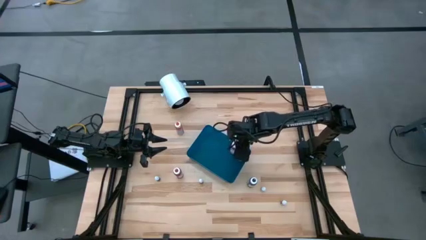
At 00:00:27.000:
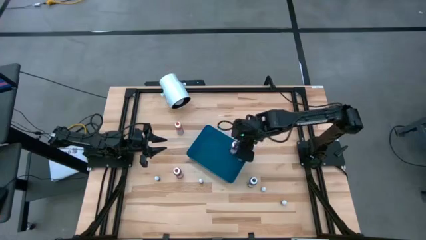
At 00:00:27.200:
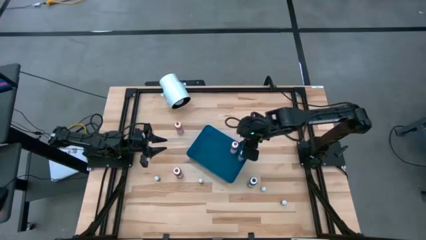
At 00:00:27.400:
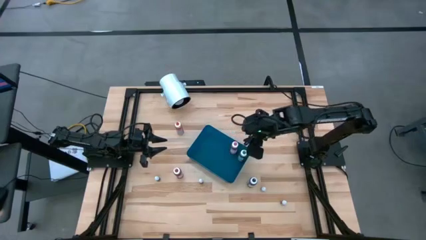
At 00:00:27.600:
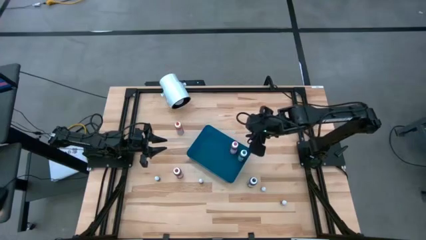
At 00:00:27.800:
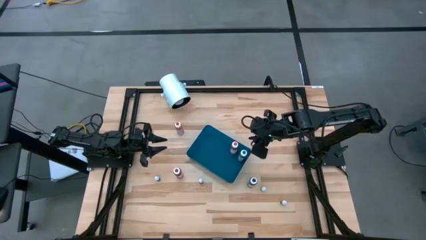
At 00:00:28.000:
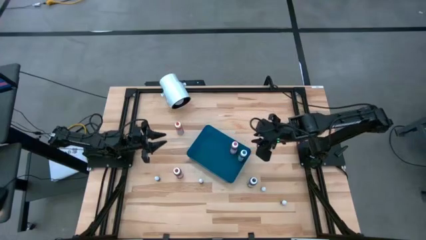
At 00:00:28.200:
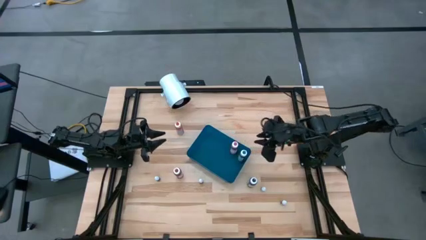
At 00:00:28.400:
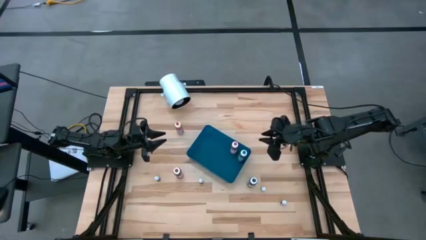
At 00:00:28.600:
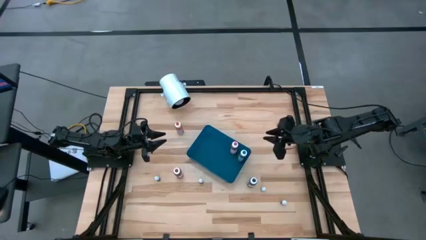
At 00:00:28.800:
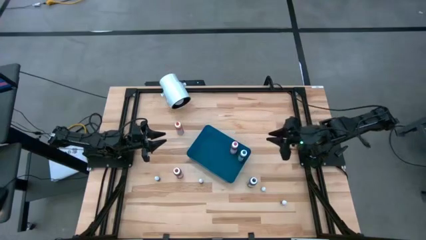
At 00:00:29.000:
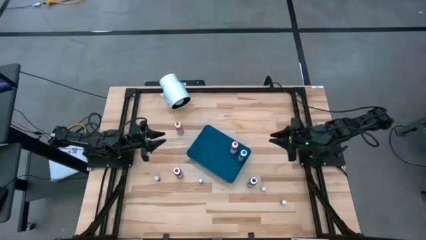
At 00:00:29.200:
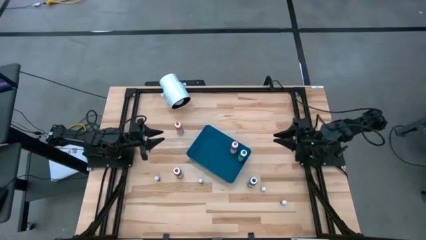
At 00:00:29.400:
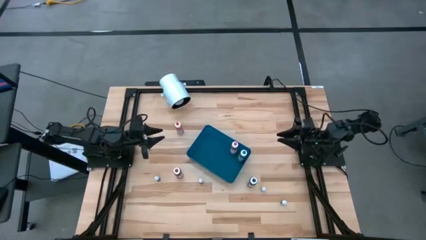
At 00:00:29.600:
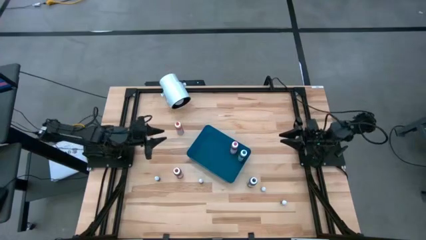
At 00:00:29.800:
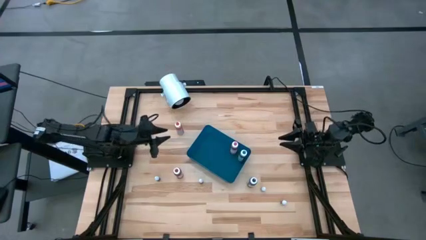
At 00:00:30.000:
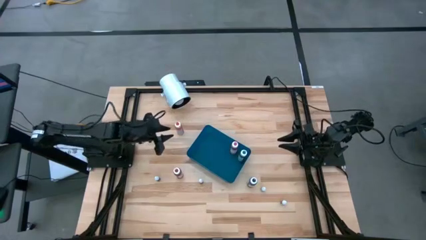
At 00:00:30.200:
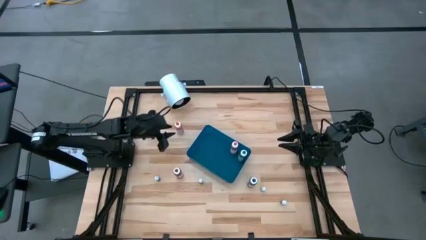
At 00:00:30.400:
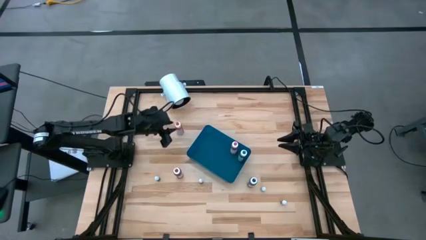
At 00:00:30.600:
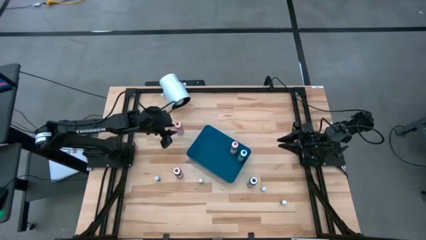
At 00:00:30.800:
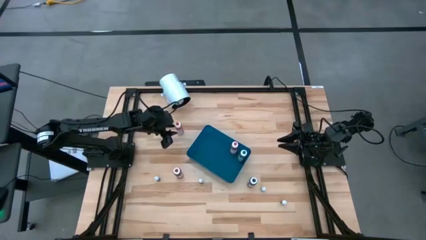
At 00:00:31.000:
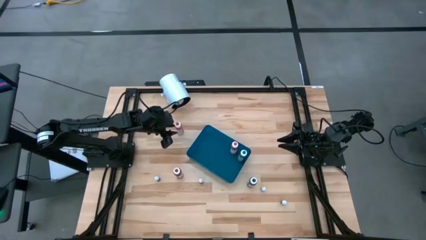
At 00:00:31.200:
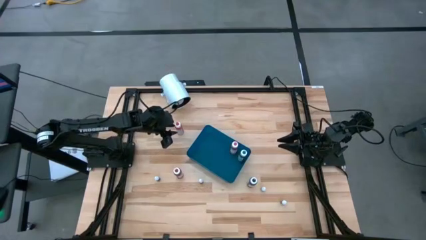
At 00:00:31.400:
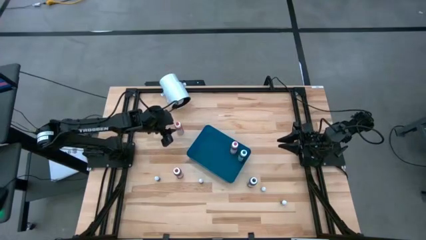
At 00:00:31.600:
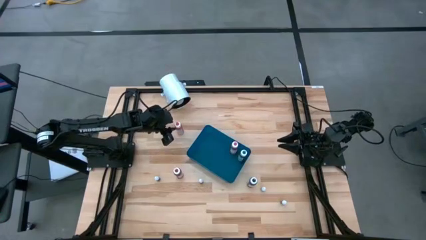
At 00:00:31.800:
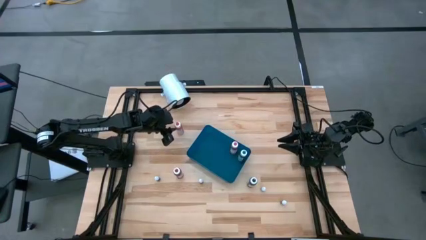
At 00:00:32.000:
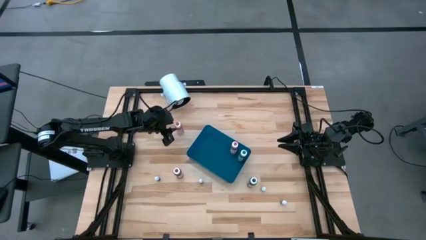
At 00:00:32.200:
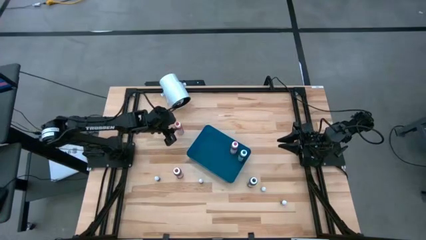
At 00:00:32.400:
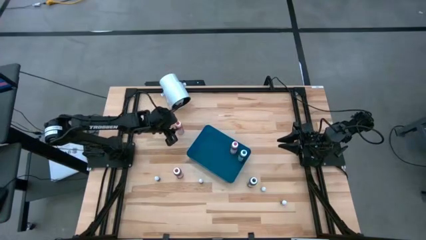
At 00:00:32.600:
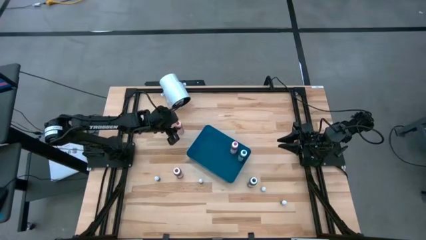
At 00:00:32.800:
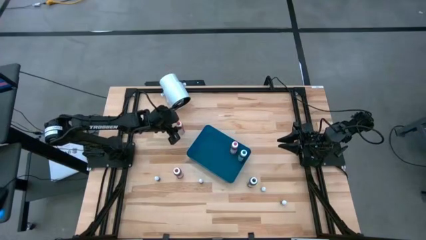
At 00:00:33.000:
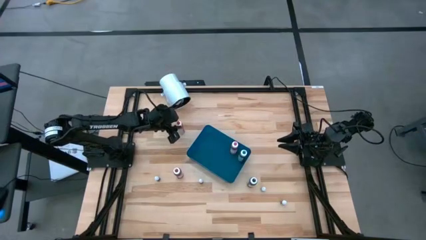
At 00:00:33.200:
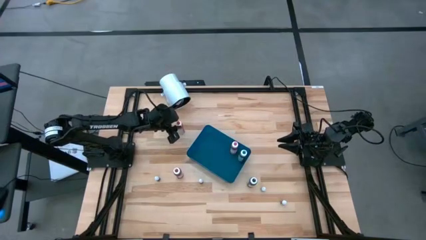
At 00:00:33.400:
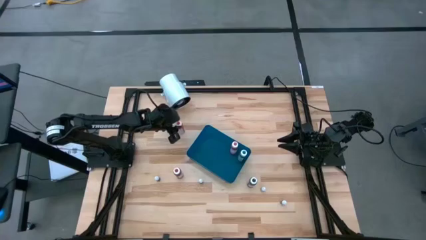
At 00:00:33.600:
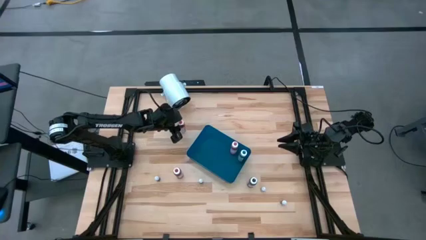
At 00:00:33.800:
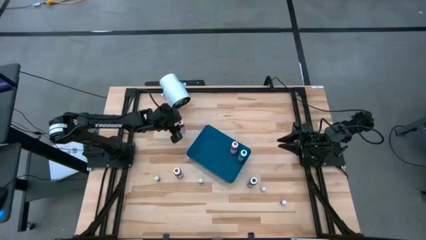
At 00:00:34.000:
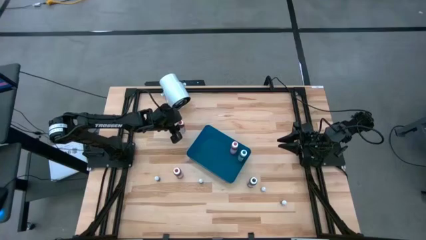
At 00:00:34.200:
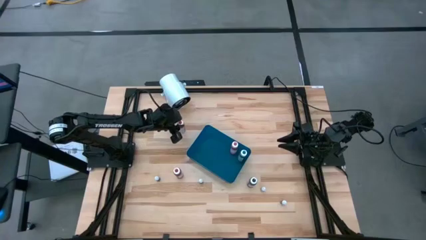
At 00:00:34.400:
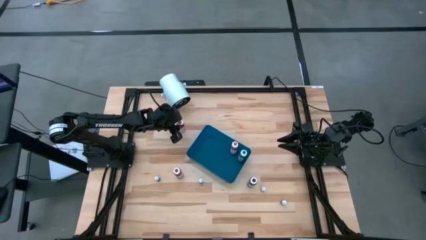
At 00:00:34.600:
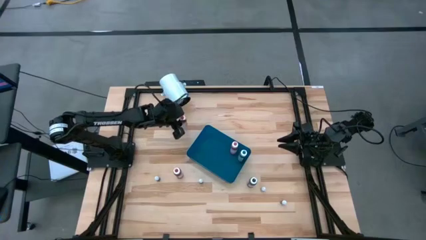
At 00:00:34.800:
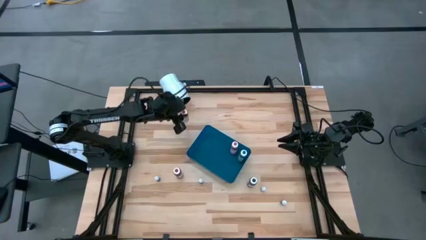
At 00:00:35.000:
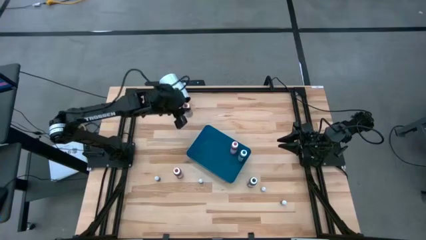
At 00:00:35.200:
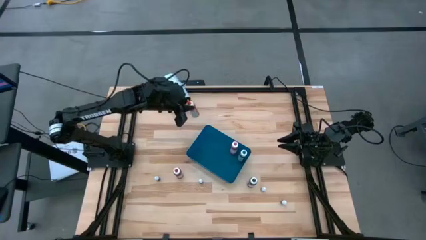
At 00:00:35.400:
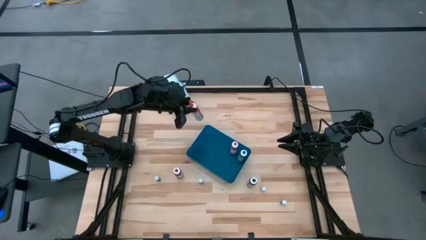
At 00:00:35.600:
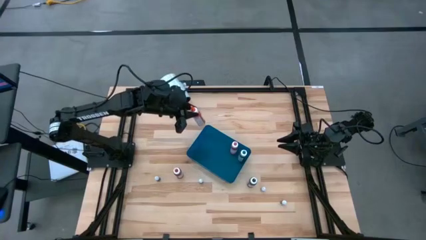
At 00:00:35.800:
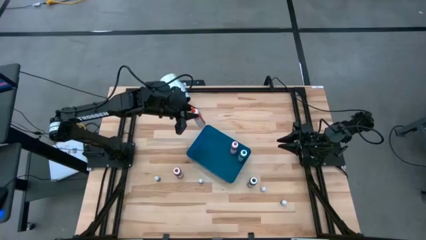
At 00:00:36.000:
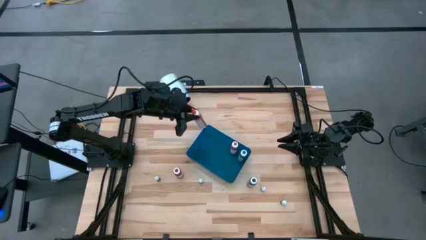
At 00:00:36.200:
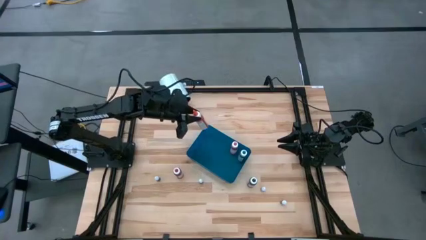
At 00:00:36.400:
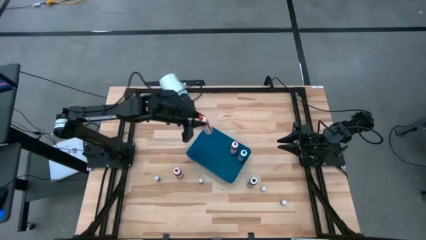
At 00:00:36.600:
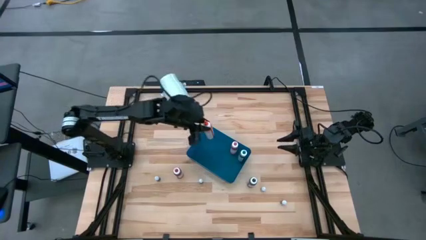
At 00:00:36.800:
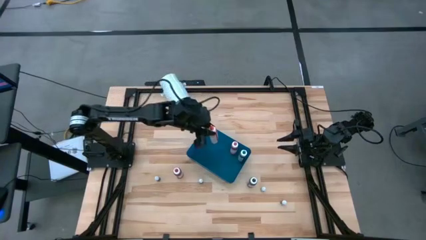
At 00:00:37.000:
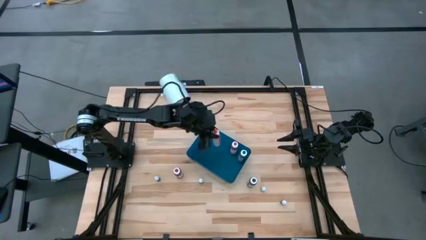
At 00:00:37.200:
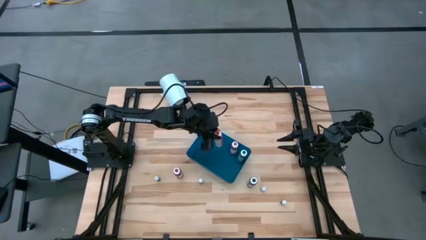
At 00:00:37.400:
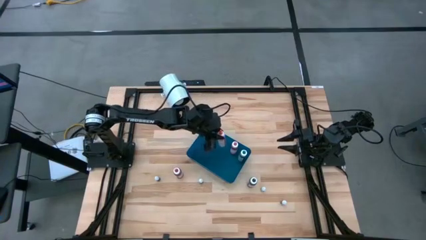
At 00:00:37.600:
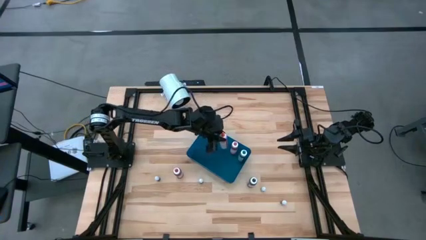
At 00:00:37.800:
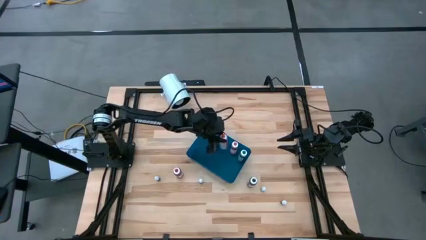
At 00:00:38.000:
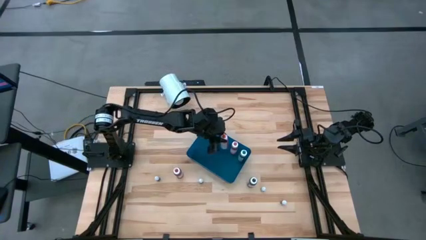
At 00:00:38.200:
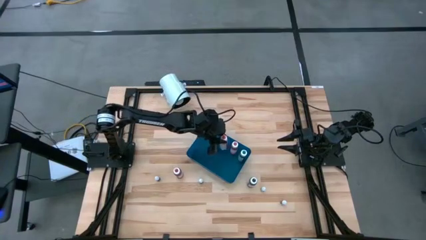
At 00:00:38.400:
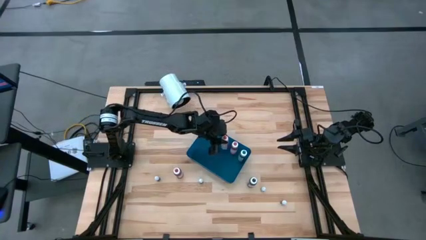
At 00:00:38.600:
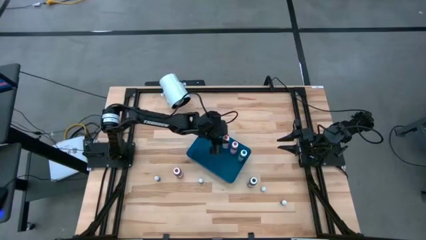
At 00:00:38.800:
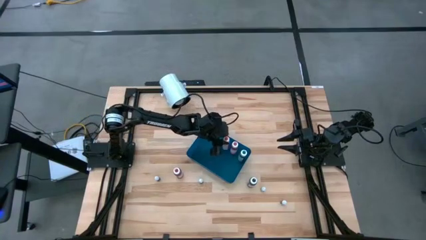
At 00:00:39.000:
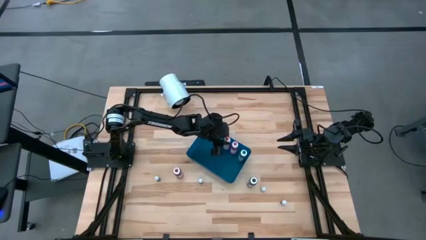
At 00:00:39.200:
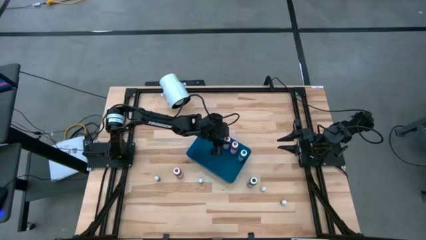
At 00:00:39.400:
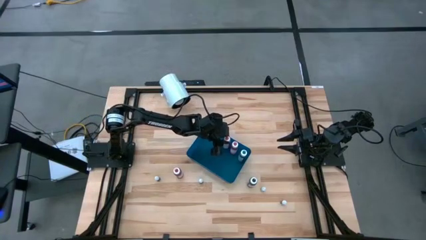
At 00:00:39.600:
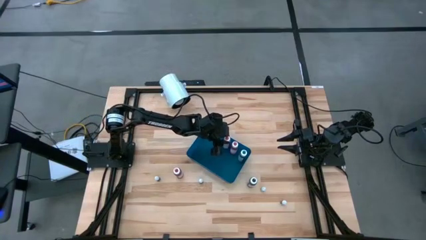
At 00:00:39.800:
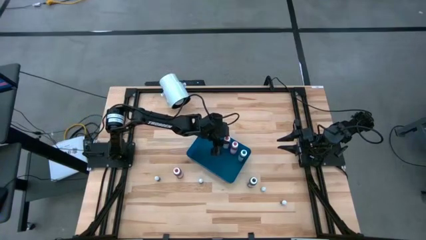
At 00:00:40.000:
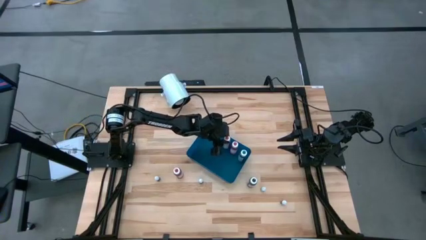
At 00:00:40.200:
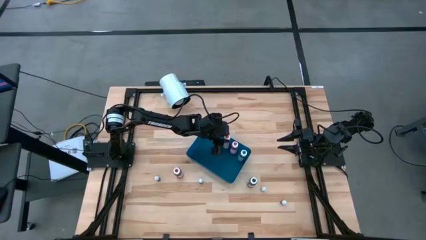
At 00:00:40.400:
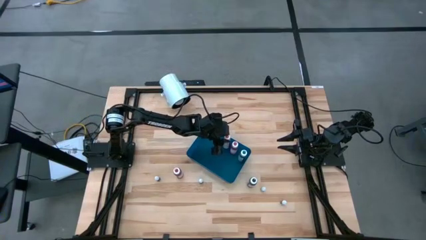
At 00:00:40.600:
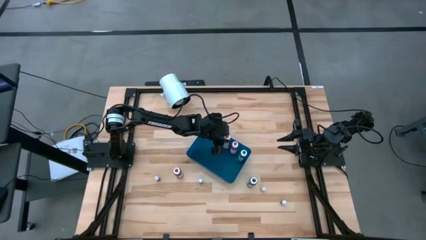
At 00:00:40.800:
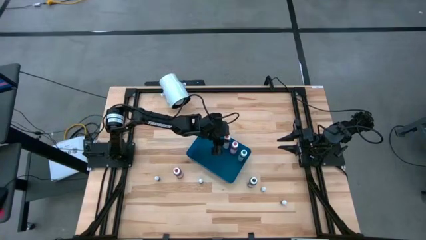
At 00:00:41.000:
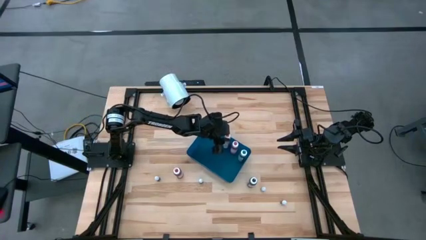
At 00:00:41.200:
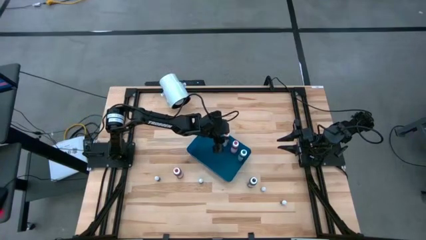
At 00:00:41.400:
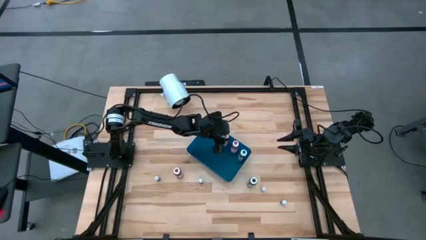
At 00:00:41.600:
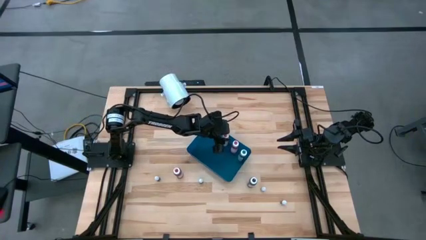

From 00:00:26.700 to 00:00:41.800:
Task: Pick & Place food coloring
Put the big orange food coloring bottle into the blue bin
